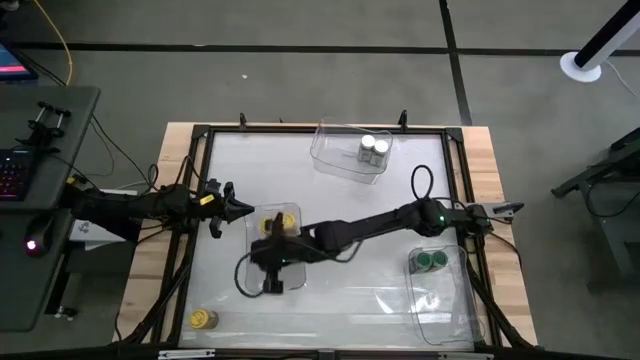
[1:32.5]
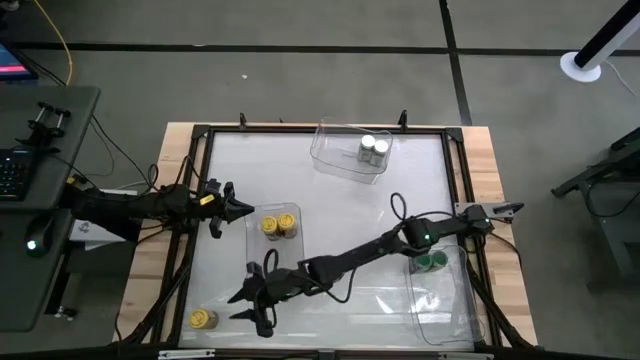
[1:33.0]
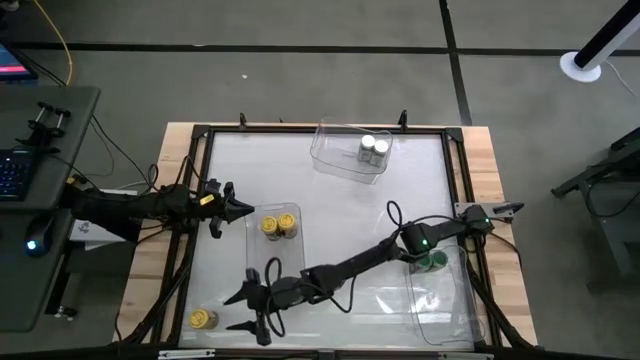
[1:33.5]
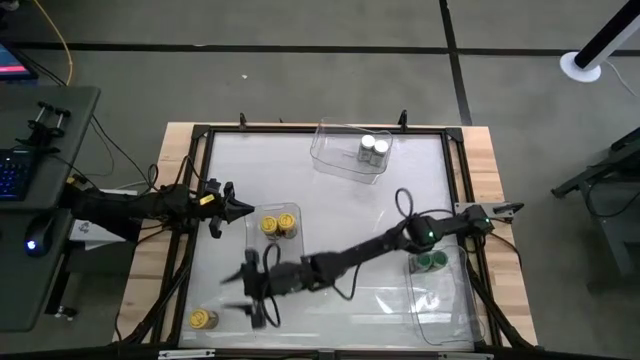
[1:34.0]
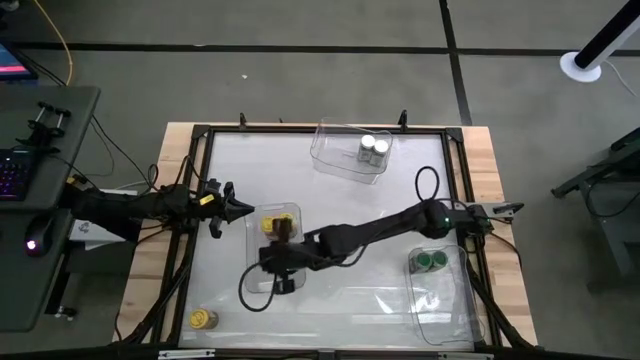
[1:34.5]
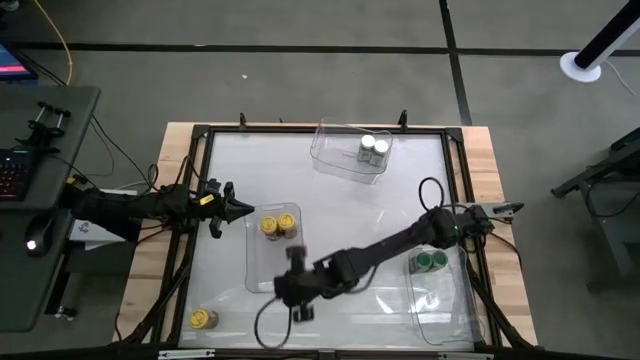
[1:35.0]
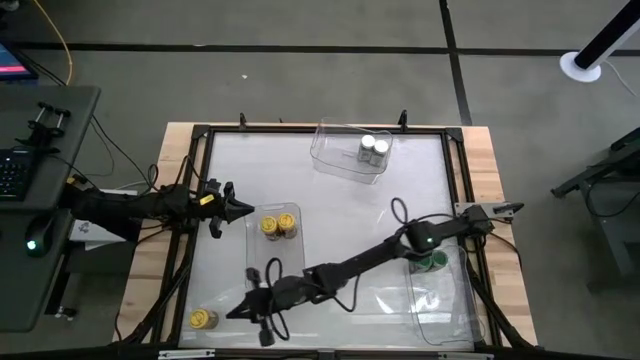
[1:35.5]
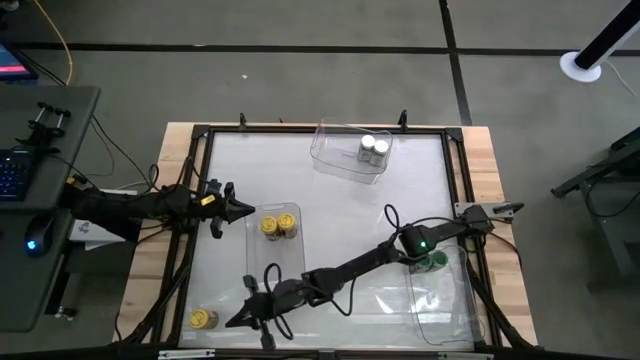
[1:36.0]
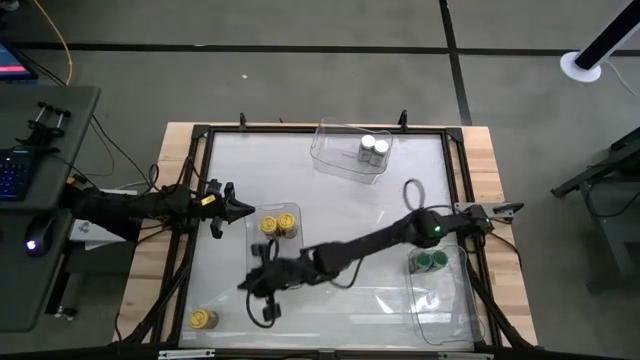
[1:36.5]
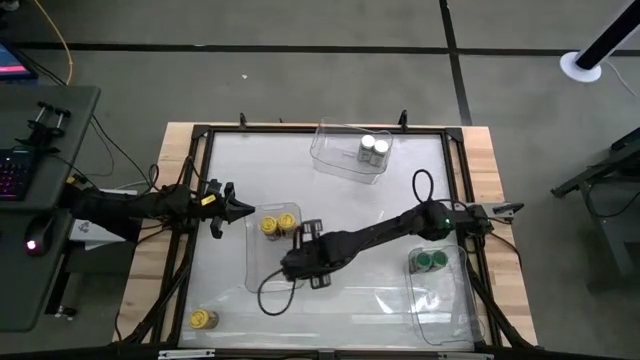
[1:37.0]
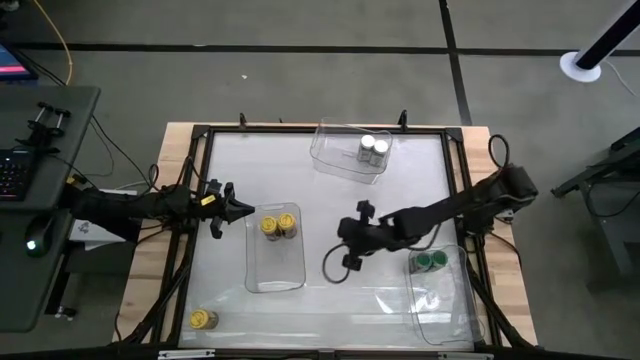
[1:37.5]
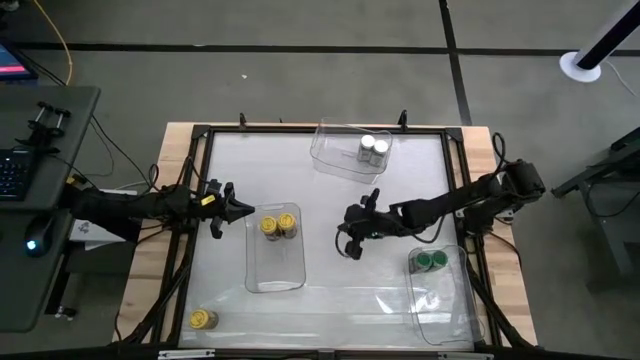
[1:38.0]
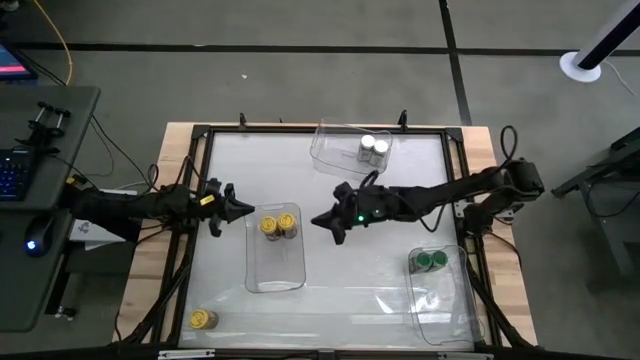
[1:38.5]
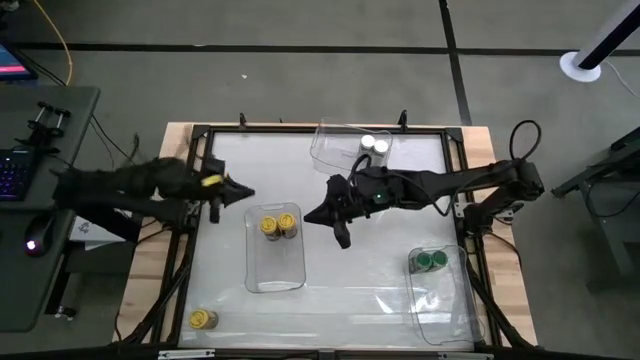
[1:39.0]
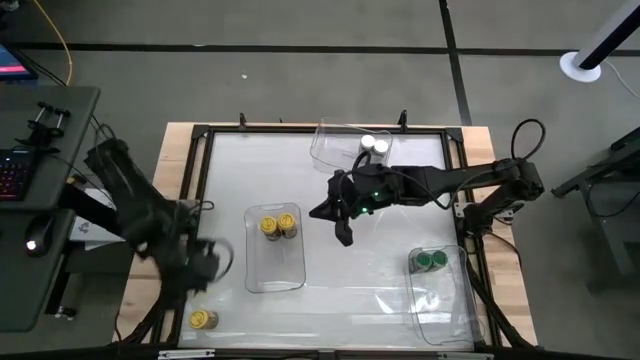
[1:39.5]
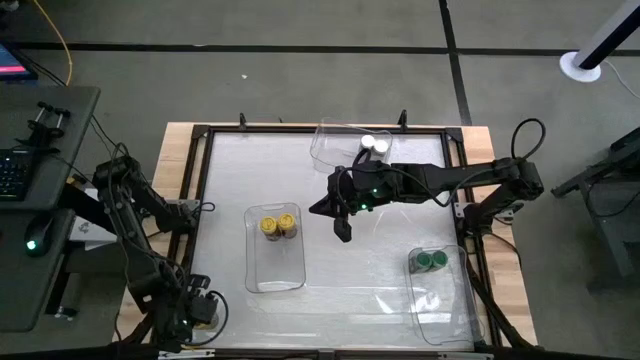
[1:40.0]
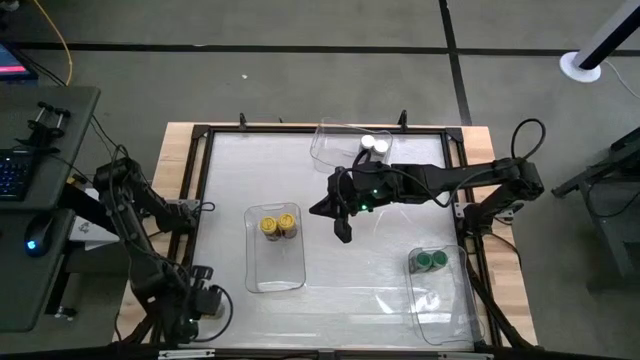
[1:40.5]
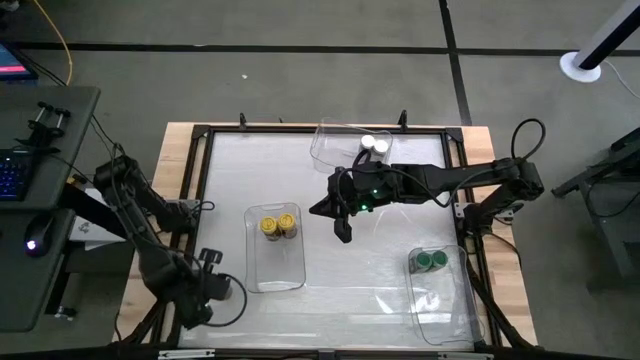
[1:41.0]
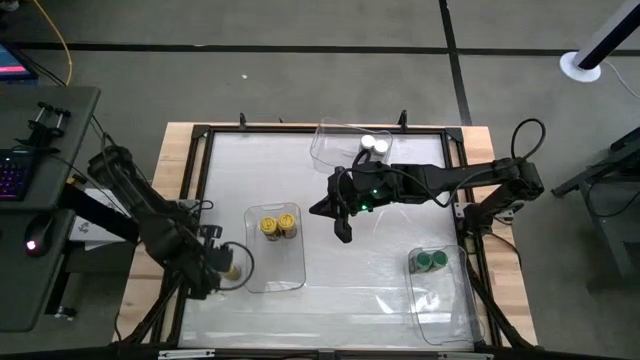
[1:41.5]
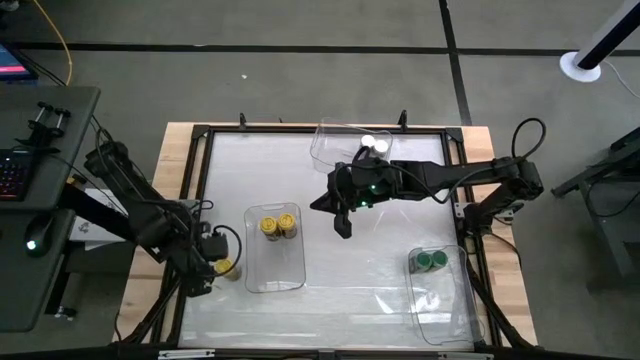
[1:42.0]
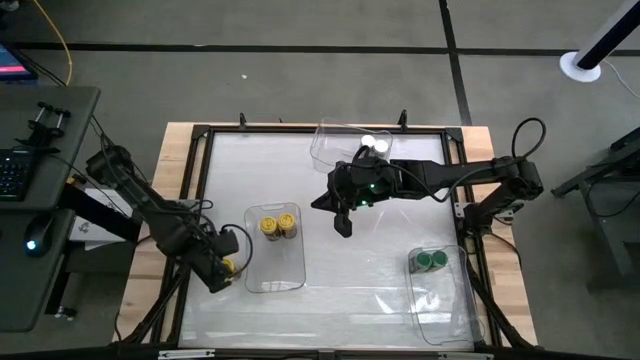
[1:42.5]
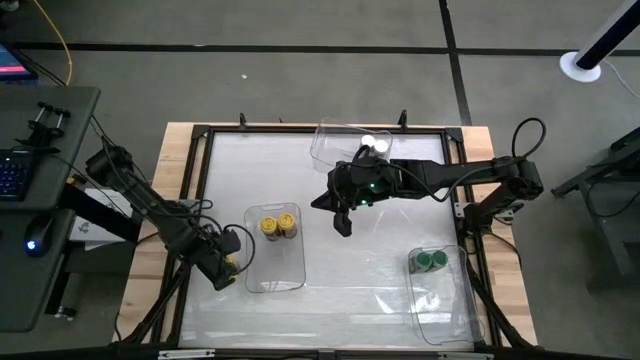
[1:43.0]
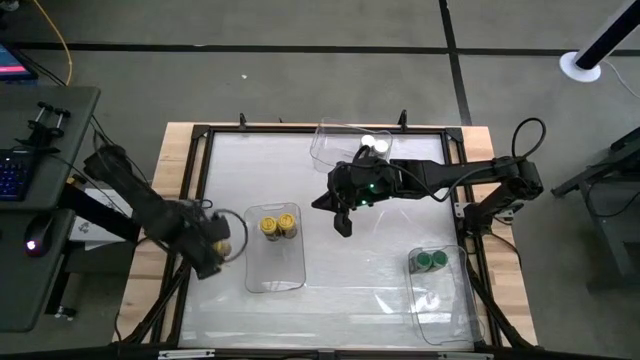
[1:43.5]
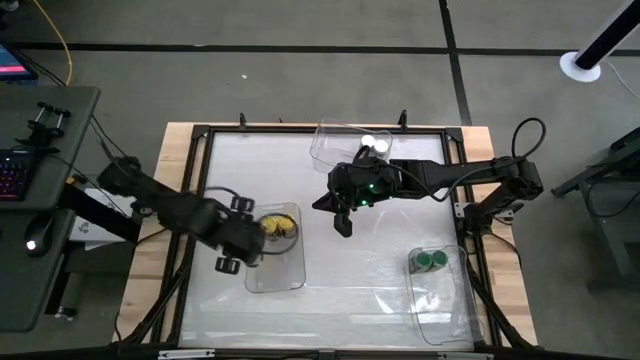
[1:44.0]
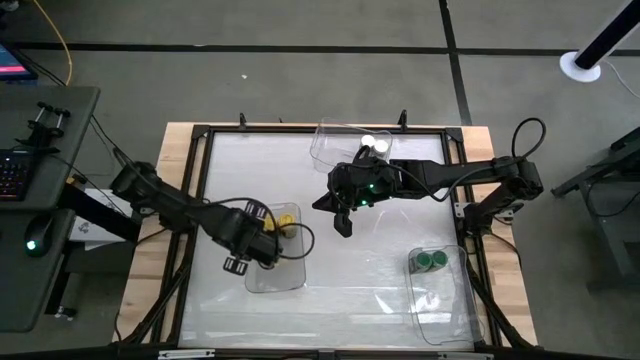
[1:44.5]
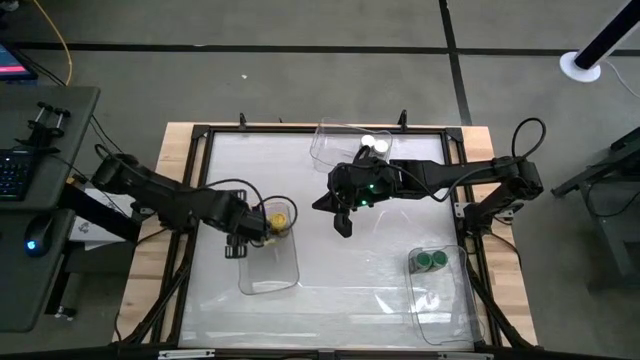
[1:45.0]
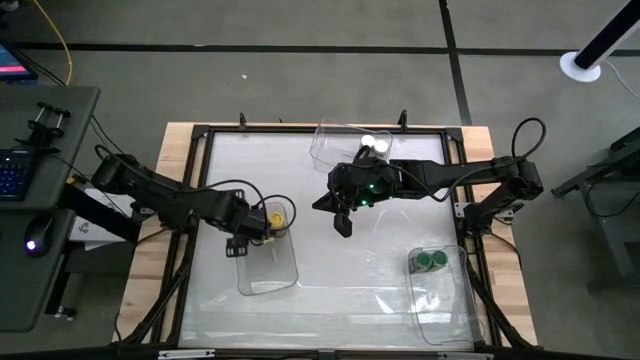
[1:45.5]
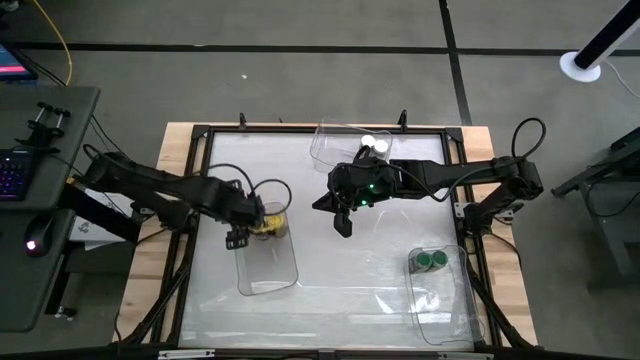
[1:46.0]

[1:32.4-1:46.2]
Task: Sort spices by type
Put the yellow seasoning bottle into the left transparent bin
